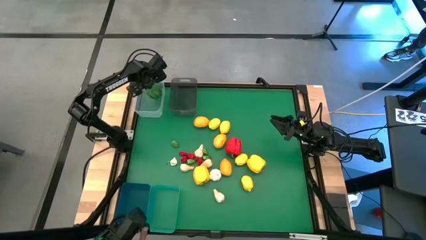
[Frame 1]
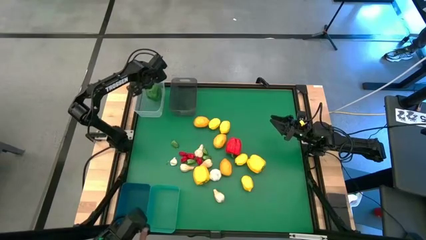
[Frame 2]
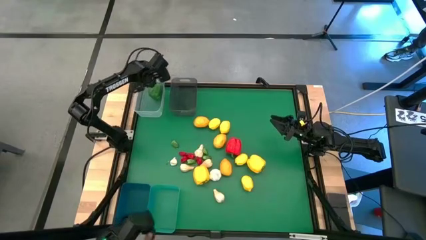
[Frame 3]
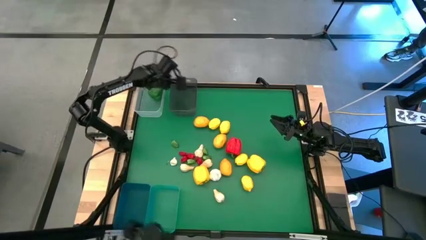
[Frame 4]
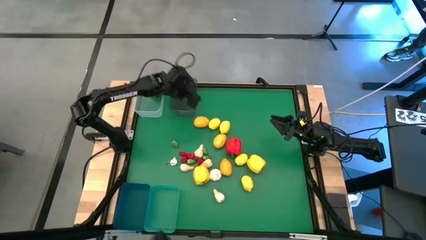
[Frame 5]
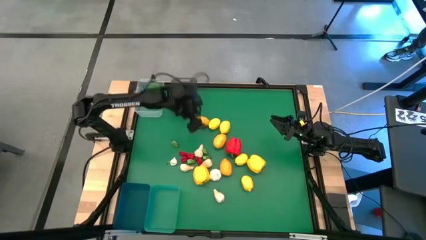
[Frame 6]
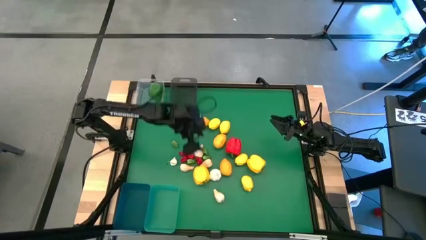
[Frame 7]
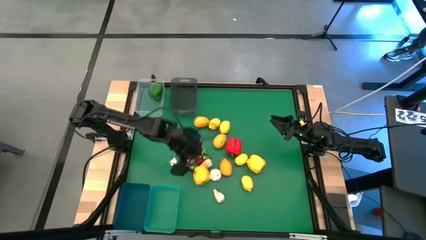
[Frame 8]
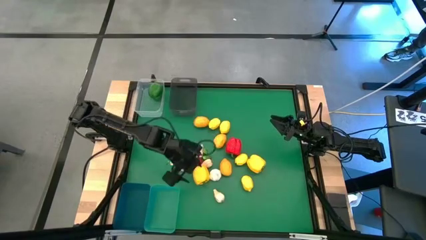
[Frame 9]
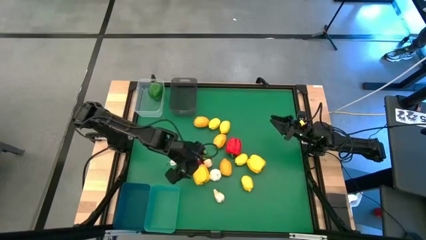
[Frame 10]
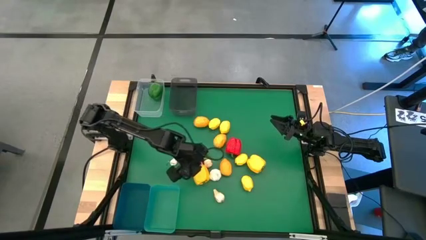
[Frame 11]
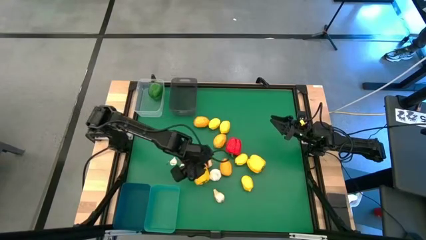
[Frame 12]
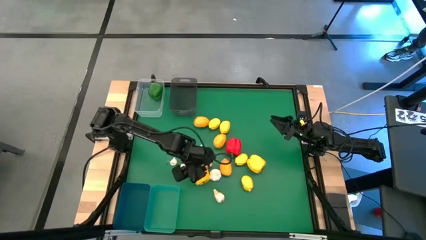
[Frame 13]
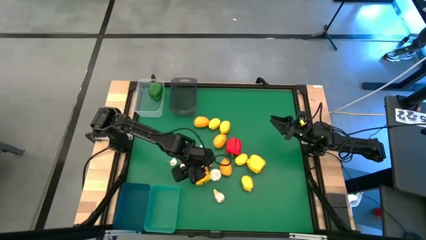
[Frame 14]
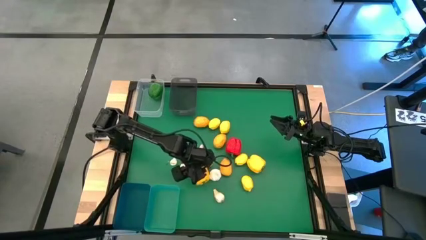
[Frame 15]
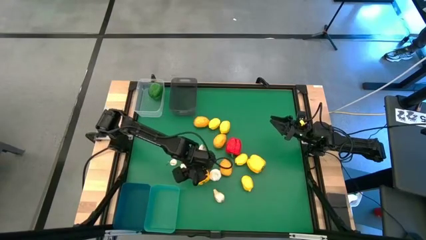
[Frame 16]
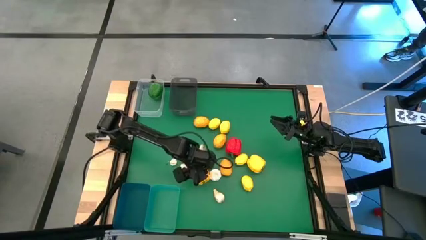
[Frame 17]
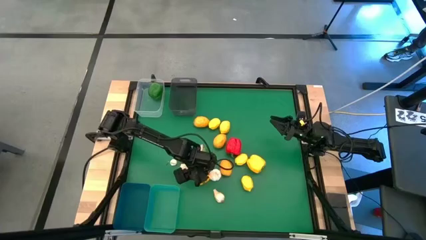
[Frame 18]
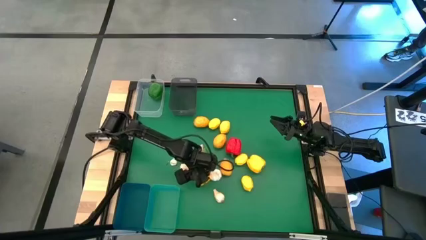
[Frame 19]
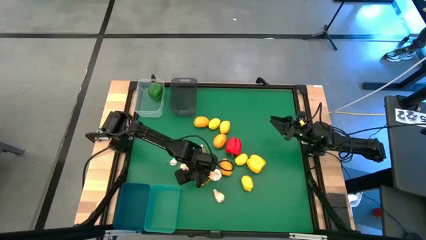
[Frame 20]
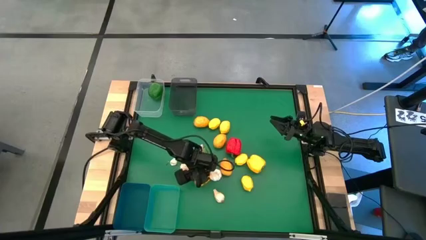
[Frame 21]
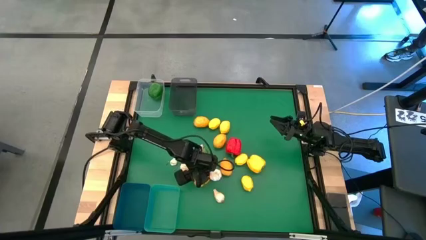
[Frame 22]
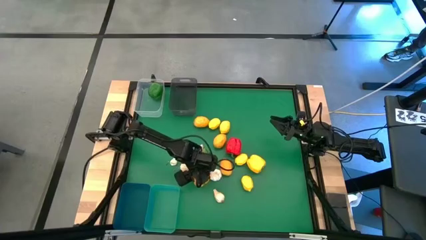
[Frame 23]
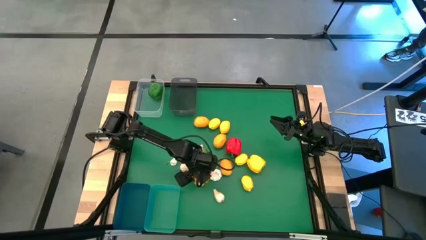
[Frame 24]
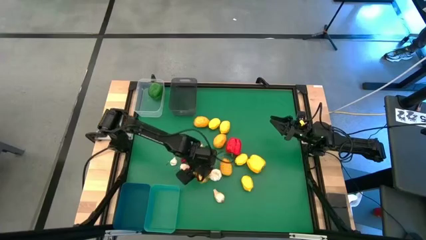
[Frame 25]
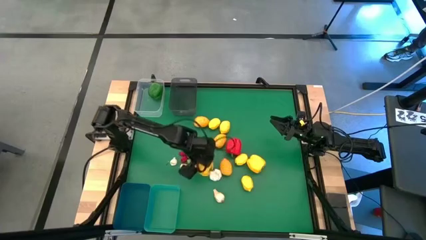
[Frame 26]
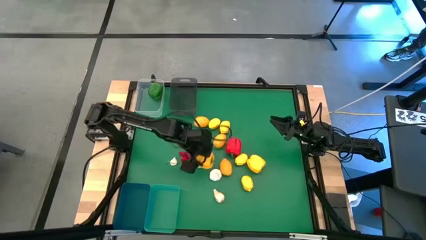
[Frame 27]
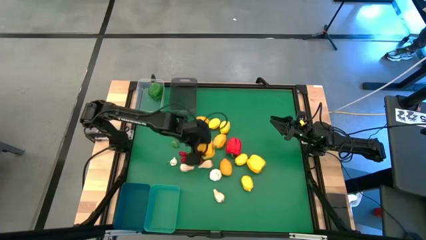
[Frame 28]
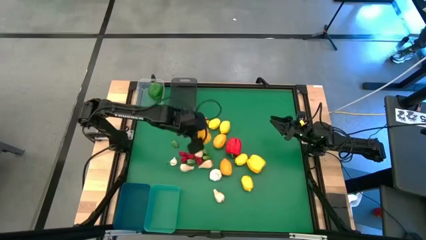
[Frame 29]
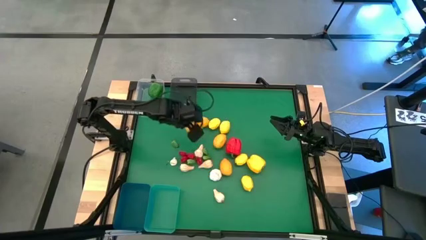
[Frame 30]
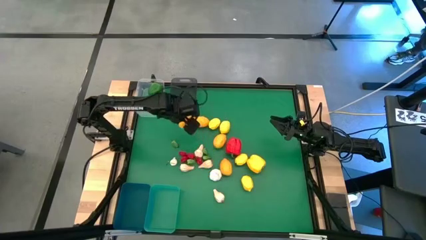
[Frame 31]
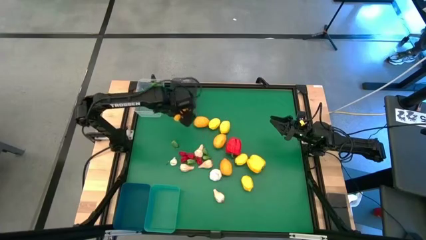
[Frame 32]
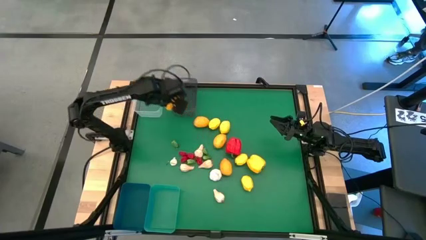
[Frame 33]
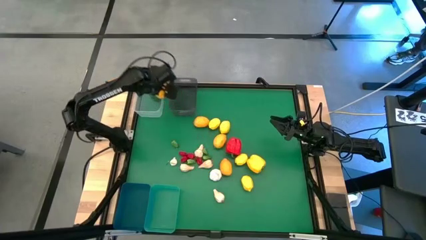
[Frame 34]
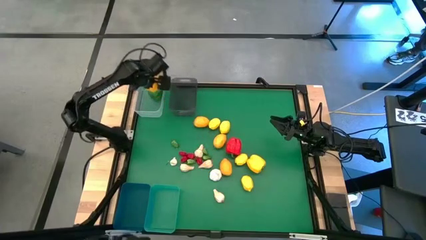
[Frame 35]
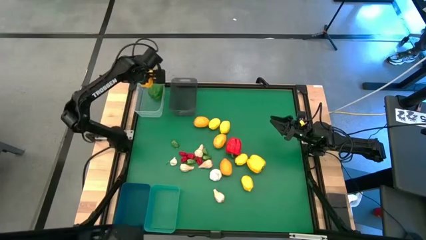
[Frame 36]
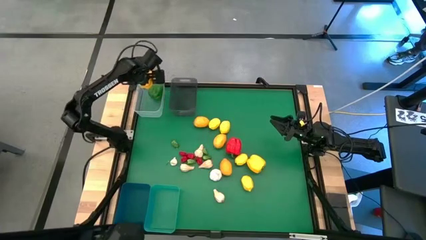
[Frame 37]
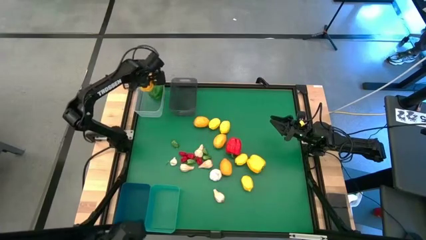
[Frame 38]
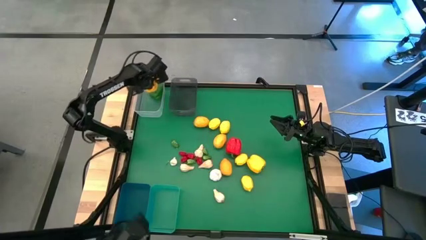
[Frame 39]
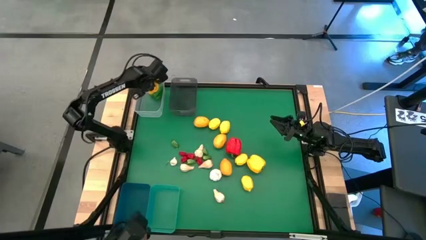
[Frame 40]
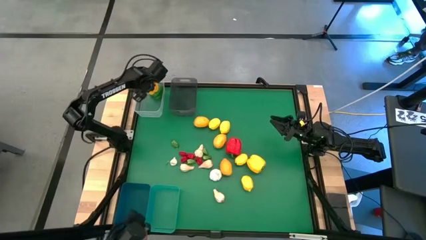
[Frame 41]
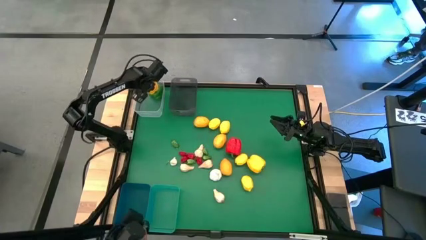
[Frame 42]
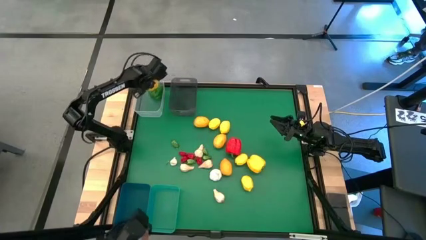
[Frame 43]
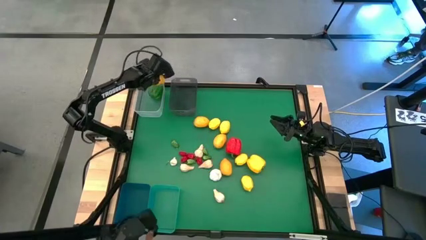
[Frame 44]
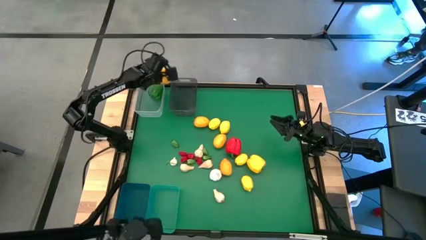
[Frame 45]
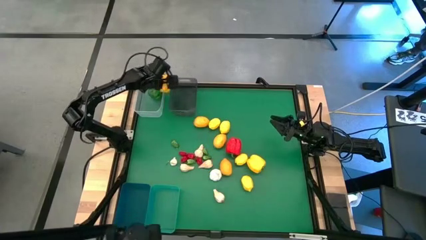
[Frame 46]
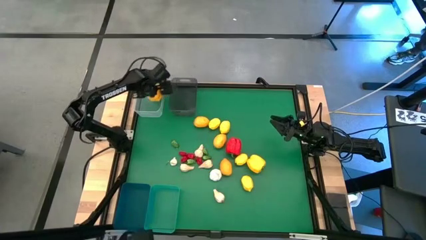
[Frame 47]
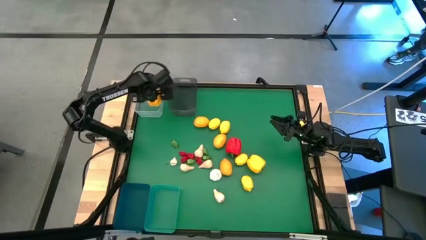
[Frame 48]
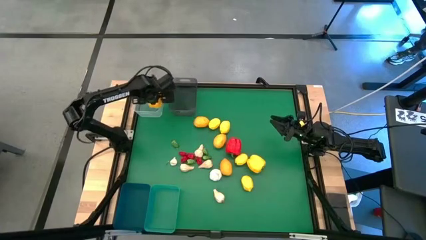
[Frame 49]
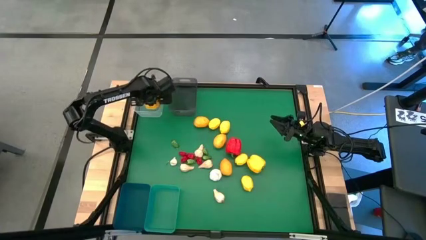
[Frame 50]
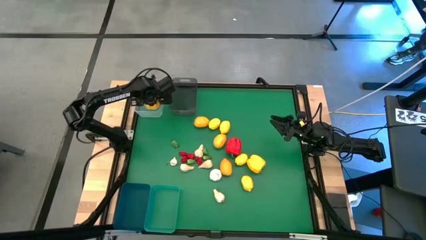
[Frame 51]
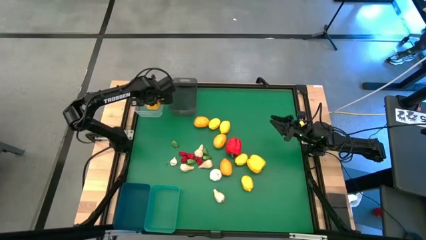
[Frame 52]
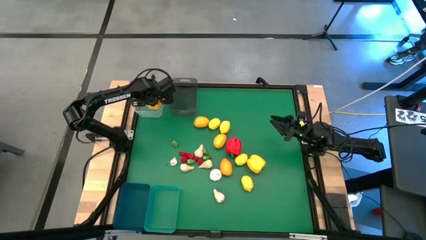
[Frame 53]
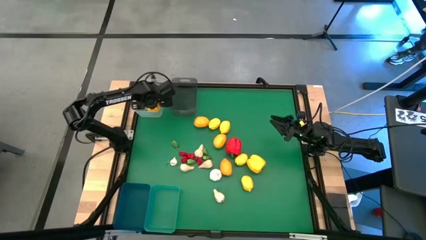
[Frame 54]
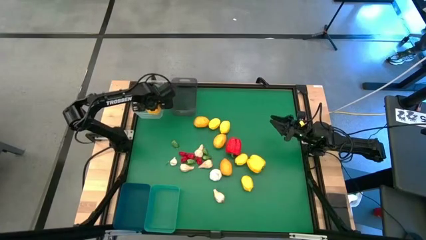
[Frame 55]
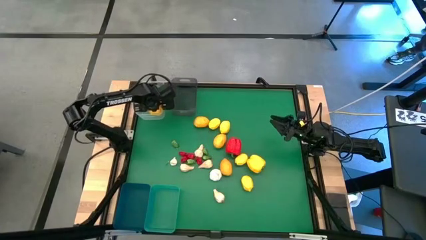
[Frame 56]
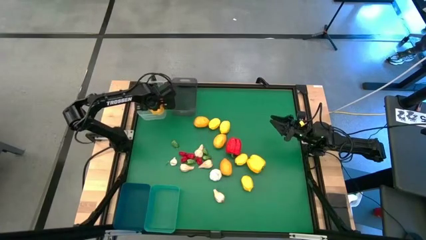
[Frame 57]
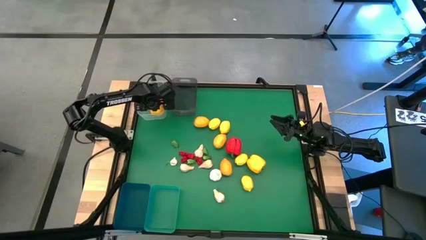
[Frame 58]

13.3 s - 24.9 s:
Task: Sort produce into baskets
Put the yellow bell pepper into the transparent bin

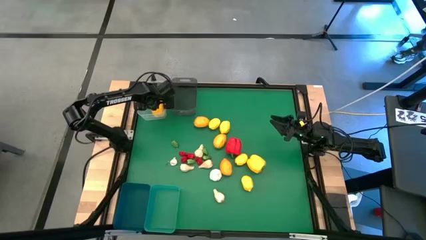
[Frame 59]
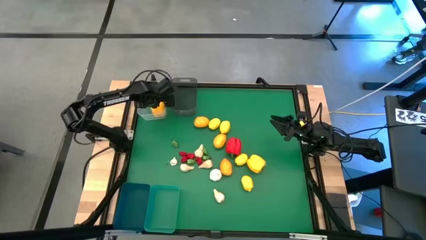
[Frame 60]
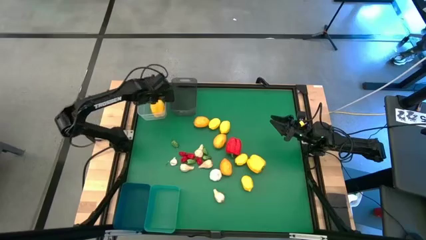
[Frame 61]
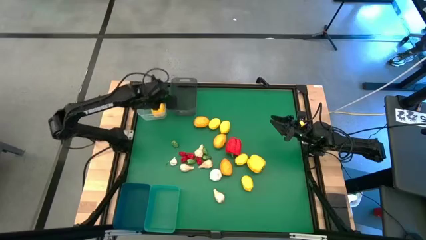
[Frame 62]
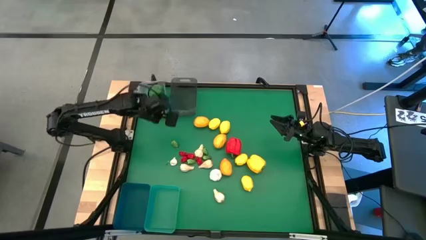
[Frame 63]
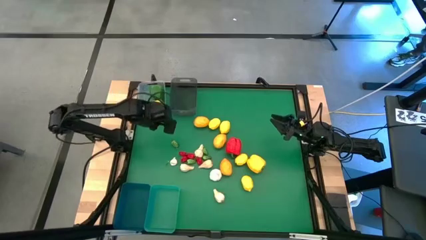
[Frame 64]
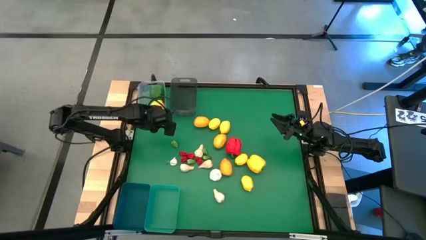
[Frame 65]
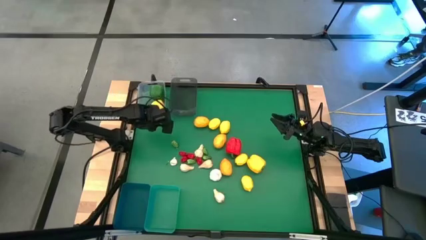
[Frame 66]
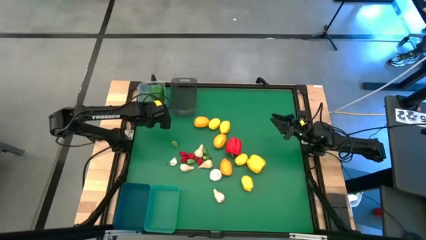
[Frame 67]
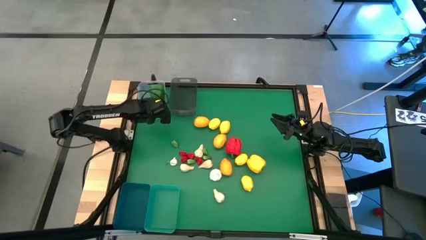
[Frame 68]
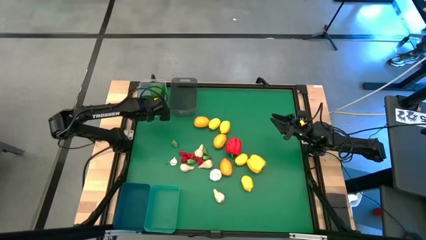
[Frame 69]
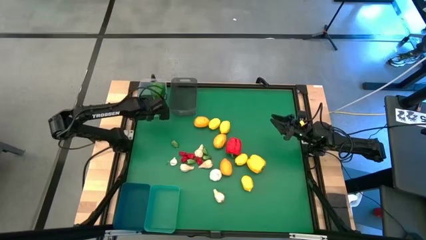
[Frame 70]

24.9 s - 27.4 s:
Adjust the transparent bin
